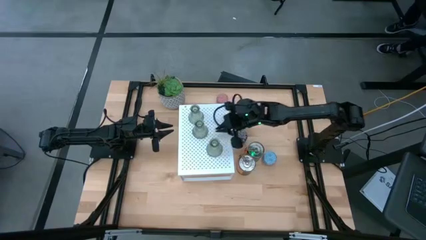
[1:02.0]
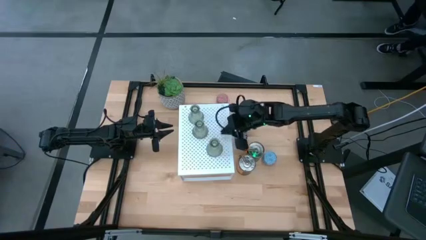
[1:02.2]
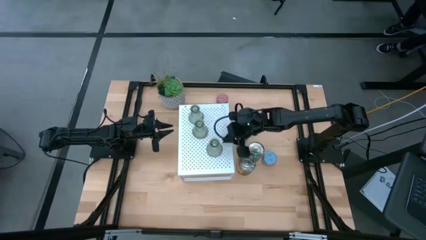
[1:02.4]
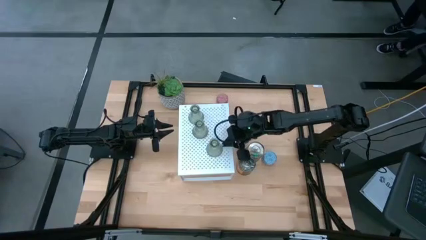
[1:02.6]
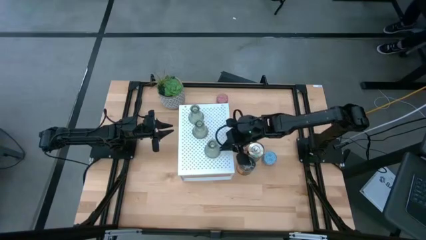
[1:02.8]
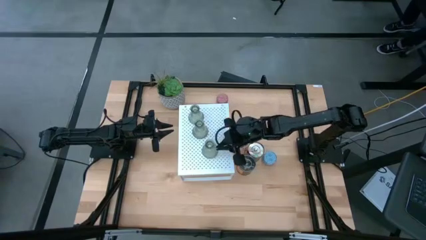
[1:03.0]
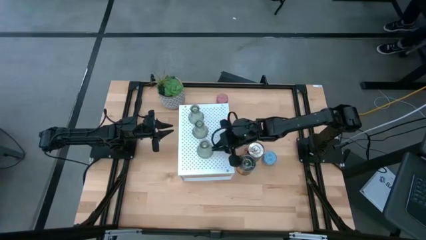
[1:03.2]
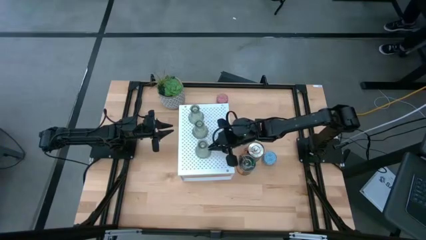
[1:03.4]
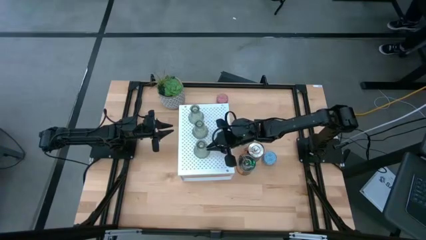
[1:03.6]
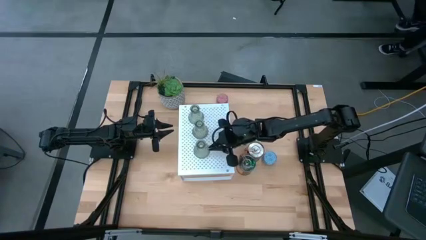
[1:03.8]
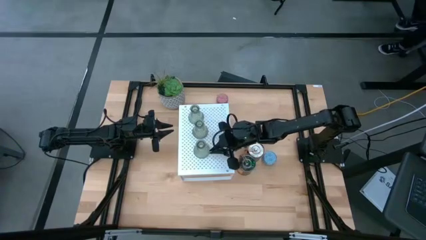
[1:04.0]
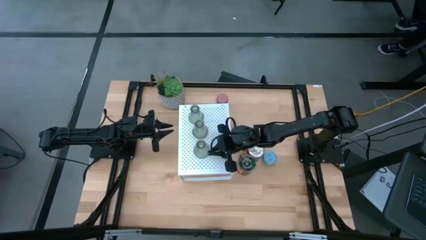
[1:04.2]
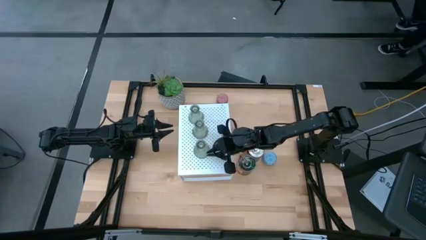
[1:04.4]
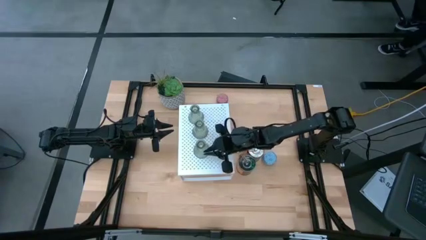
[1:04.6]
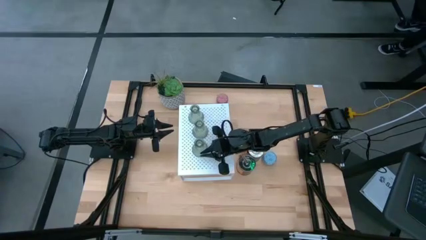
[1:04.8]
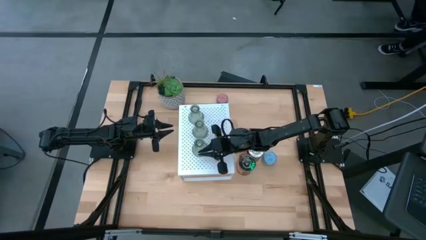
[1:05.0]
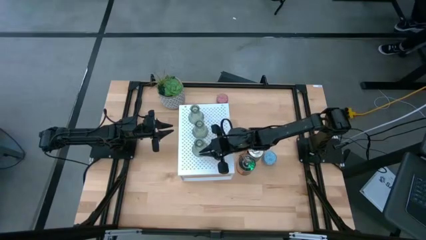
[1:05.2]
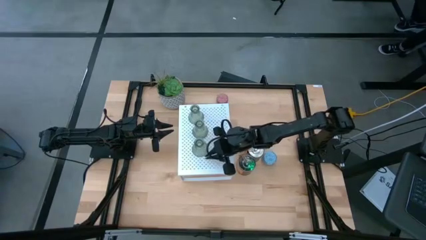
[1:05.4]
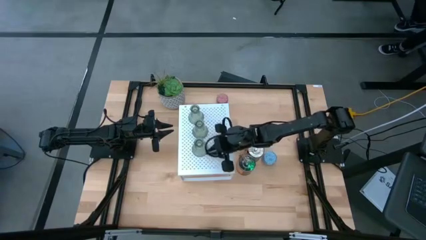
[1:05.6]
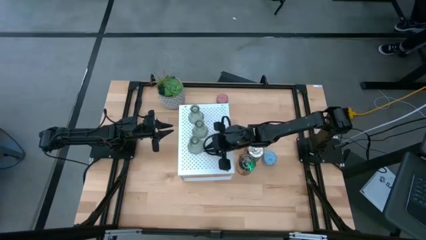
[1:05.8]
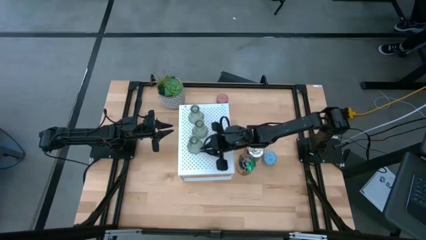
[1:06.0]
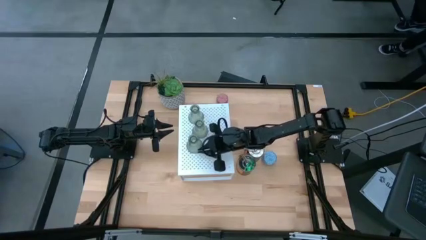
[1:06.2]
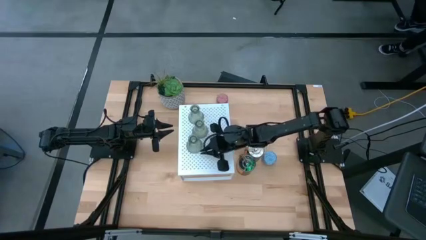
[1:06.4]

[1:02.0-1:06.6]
Task: Pick & Place candle stick holders
Adjust the green glass candle holder on the shelf

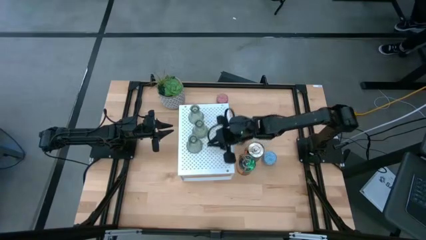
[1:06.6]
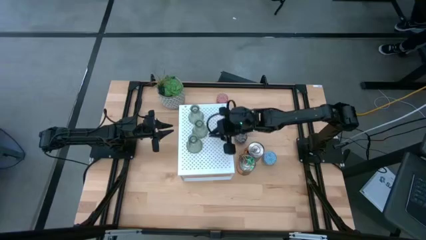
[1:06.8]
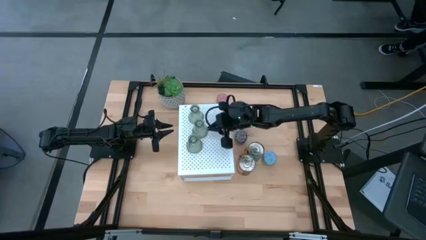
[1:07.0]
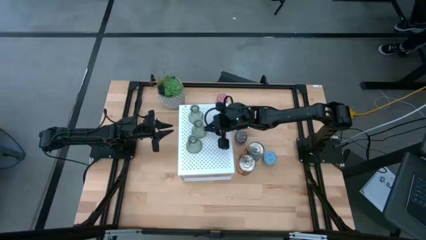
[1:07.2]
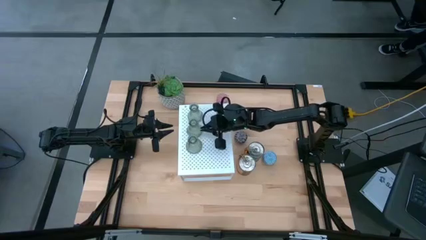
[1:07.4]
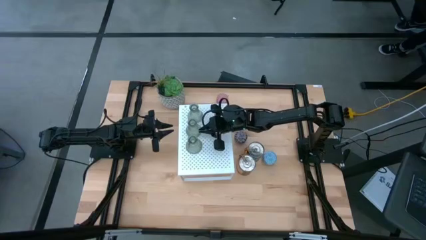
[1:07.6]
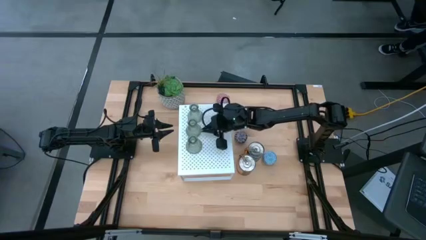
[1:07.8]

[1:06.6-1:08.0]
Adjust the green glass candle holder on the shelf

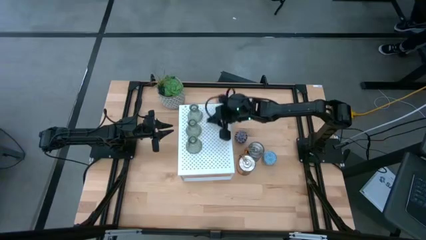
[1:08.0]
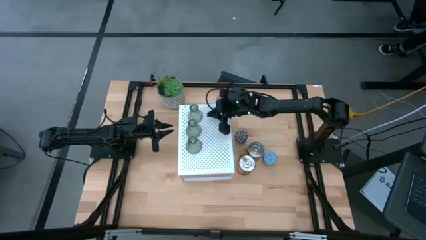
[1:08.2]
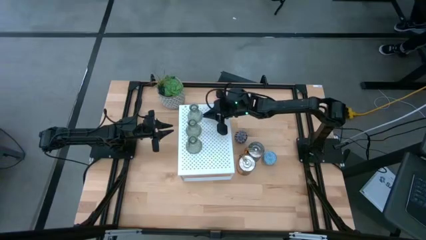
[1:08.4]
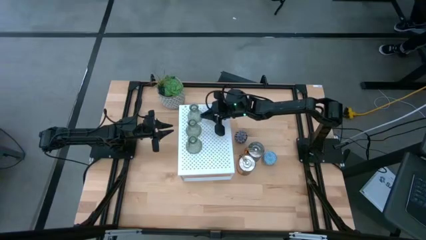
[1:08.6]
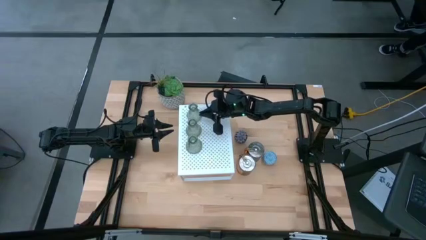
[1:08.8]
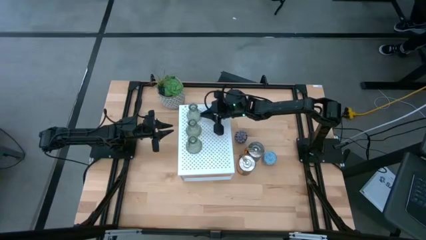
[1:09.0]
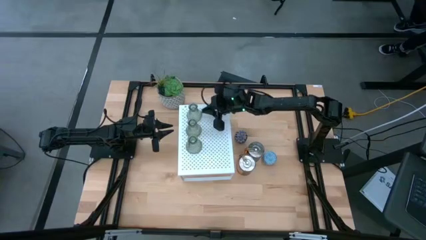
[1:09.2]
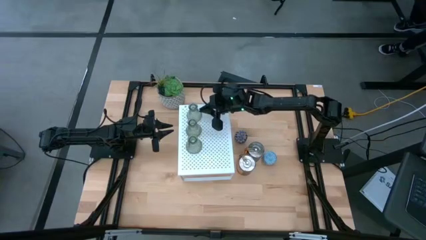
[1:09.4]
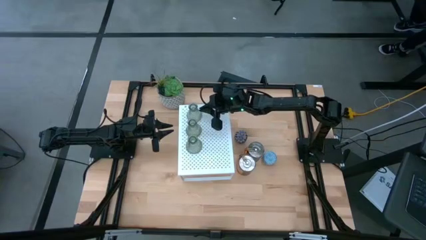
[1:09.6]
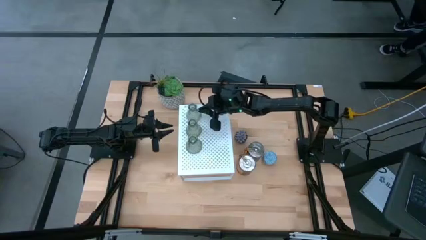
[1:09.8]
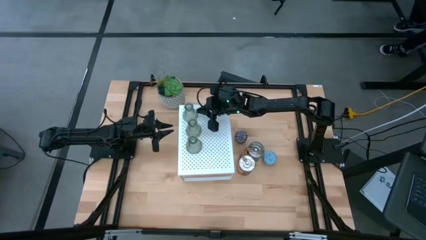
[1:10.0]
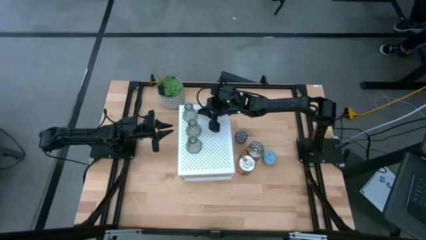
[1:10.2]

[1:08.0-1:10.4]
Adjust the green glass candle holder on the shelf

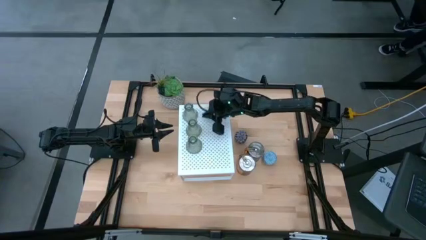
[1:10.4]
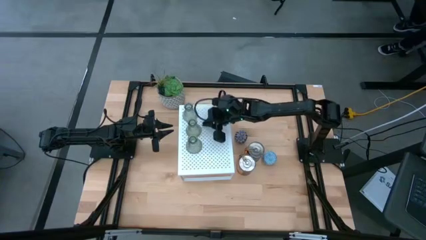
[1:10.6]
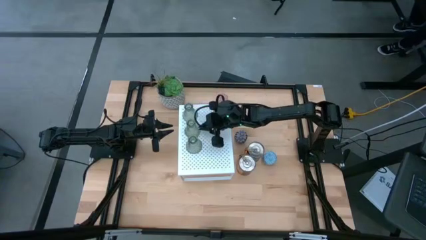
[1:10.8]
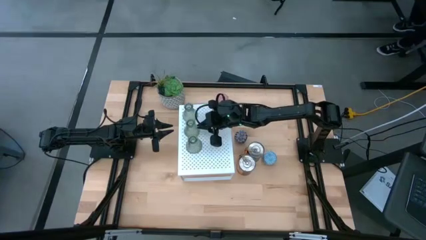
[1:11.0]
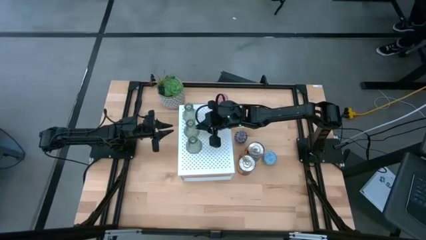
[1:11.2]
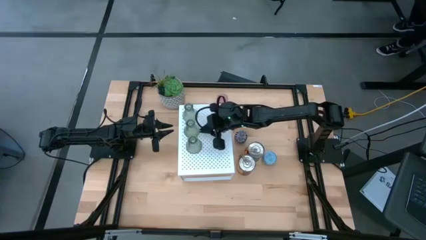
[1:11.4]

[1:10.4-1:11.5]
Adjust the green glass candle holder on the shelf

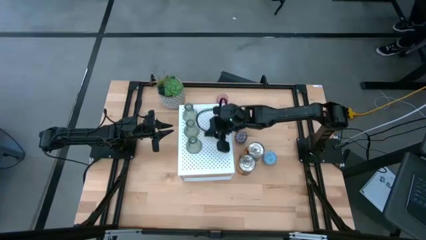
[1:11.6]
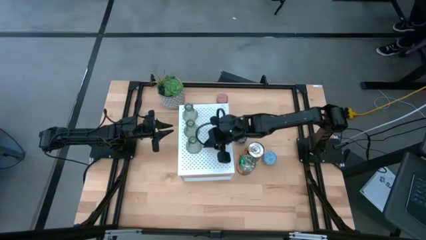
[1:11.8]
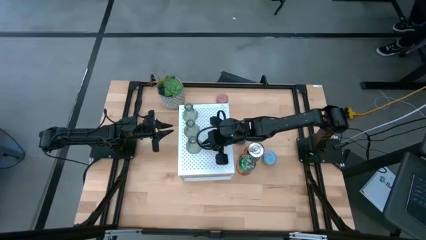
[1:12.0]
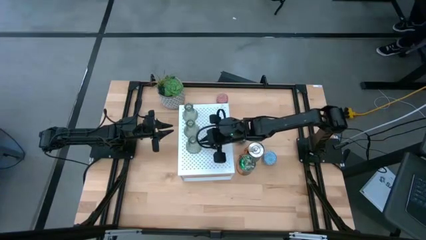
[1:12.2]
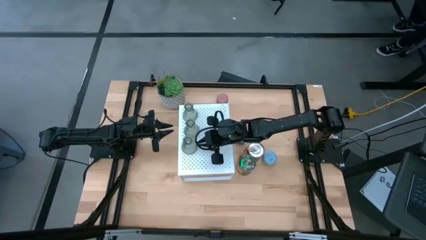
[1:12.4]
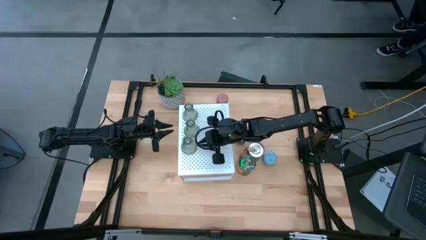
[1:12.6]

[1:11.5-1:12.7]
Adjust the green glass candle holder on the shelf

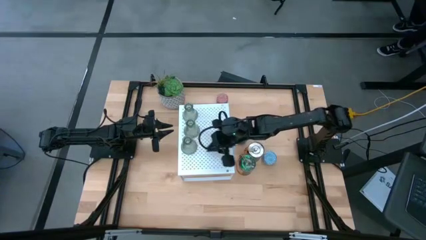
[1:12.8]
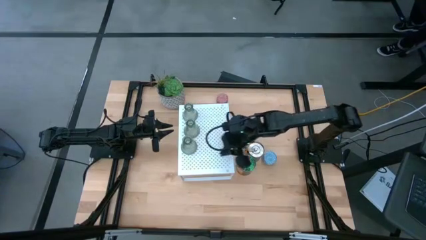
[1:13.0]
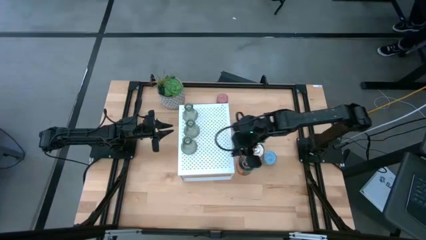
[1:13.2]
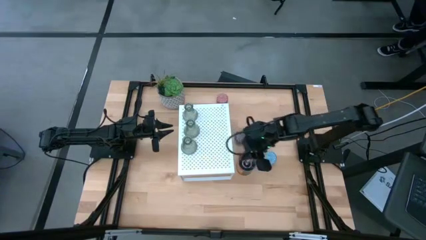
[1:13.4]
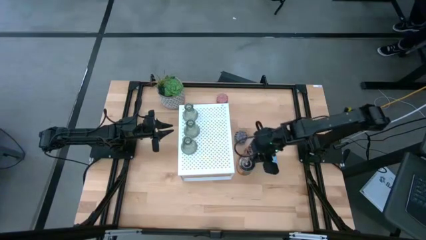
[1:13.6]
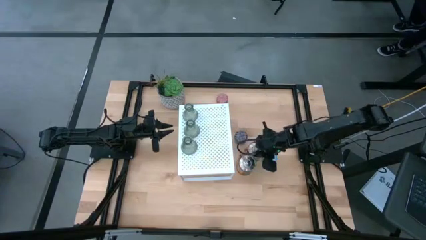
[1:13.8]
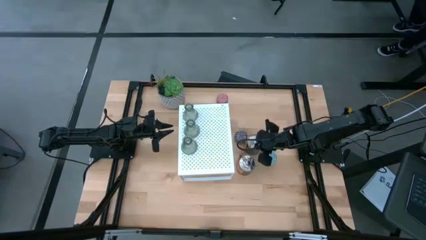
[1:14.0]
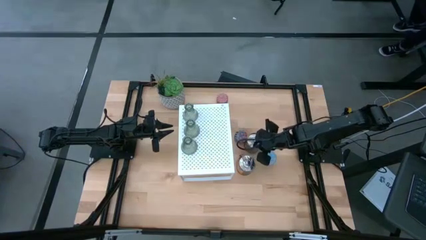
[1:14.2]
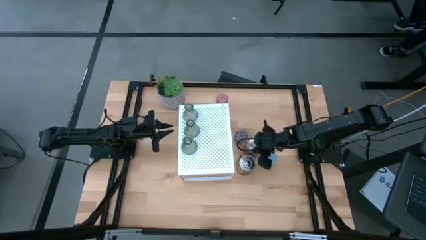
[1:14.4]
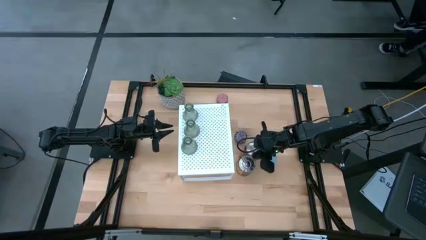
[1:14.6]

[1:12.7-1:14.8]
Put the top orange scented candle on the shelf

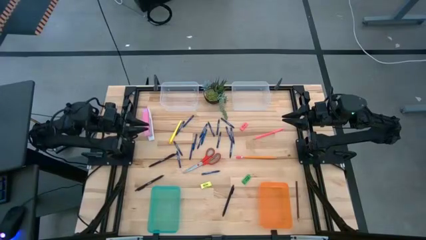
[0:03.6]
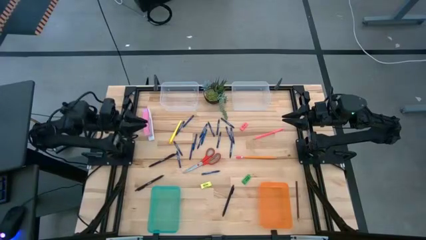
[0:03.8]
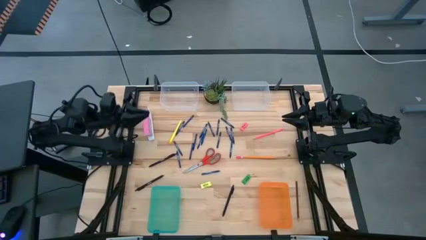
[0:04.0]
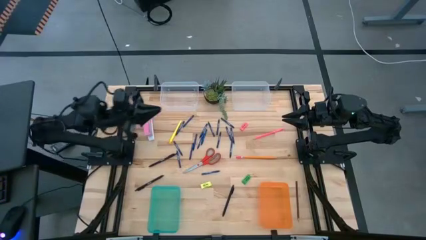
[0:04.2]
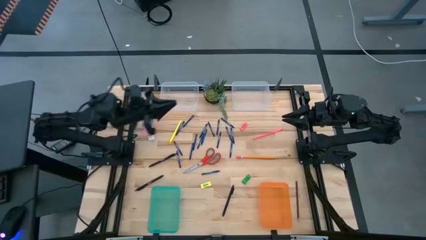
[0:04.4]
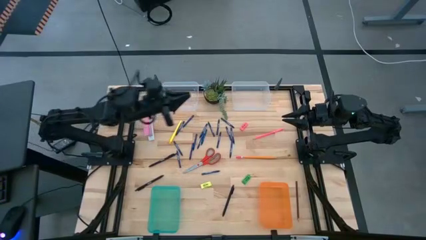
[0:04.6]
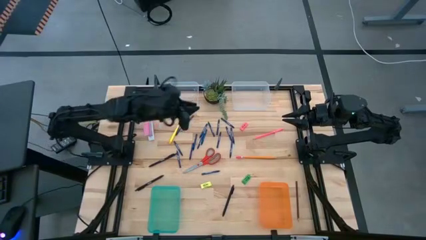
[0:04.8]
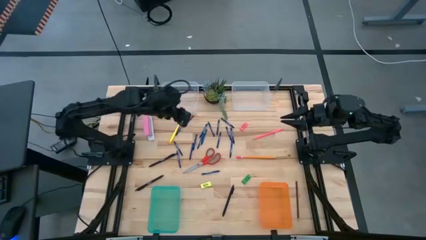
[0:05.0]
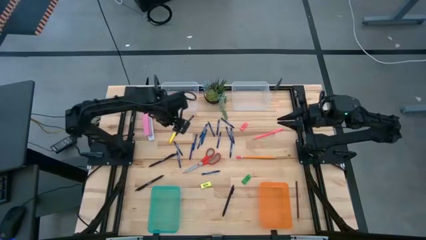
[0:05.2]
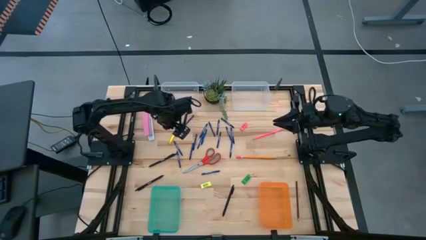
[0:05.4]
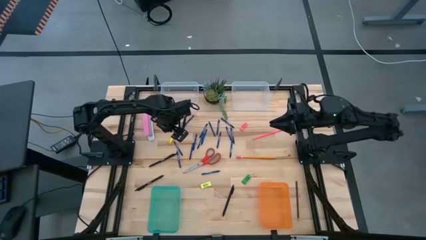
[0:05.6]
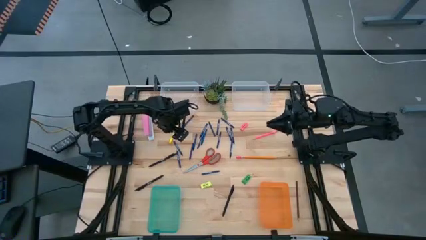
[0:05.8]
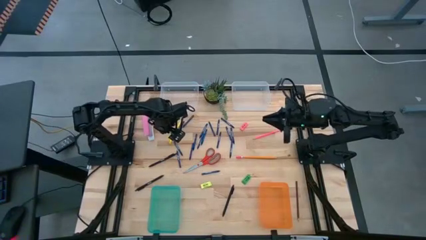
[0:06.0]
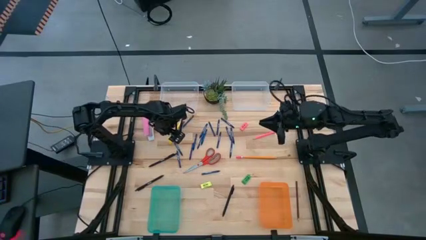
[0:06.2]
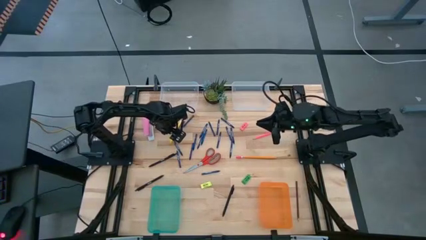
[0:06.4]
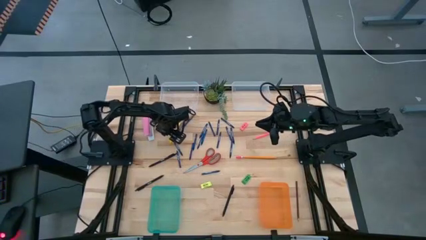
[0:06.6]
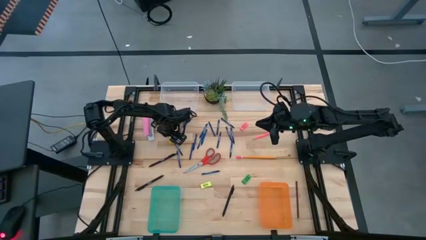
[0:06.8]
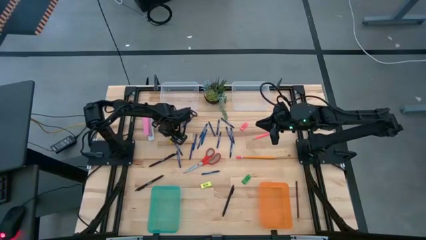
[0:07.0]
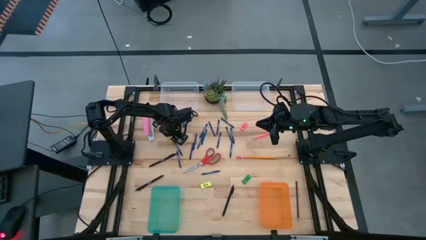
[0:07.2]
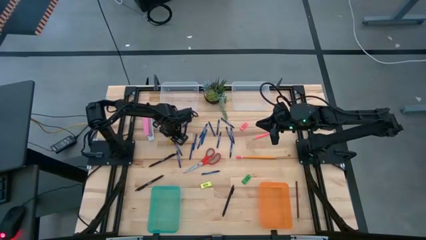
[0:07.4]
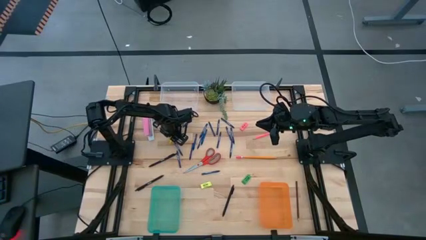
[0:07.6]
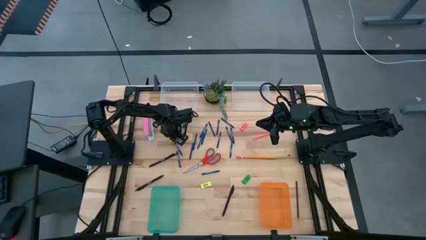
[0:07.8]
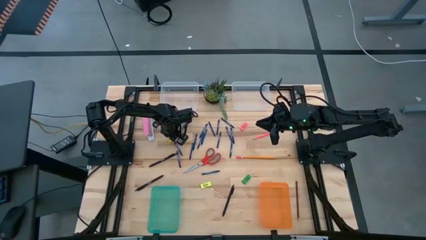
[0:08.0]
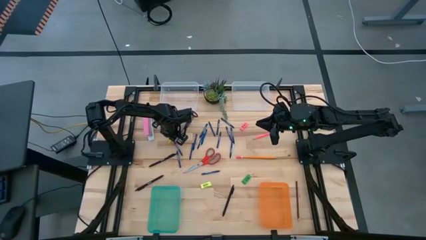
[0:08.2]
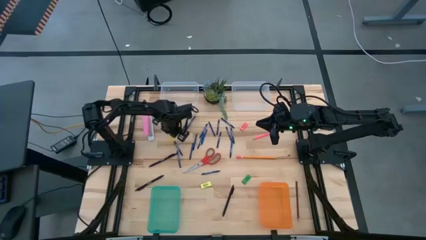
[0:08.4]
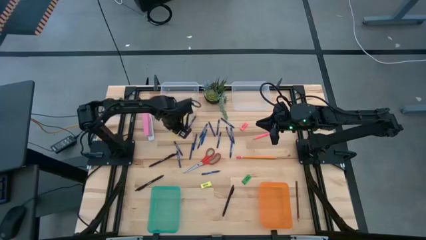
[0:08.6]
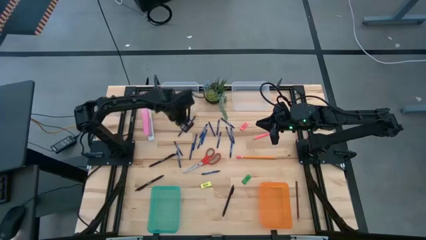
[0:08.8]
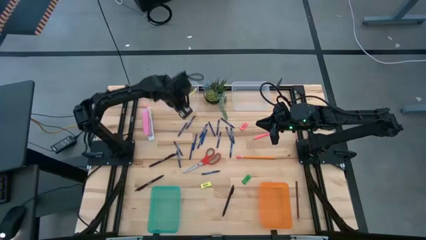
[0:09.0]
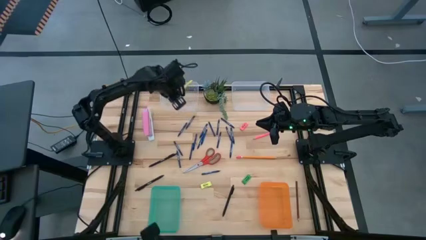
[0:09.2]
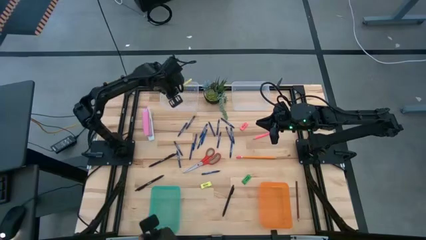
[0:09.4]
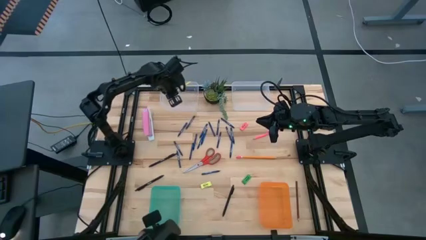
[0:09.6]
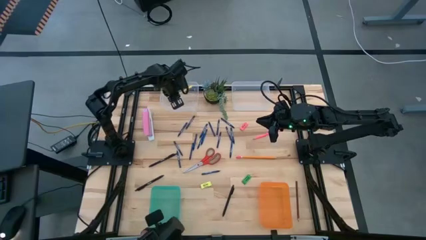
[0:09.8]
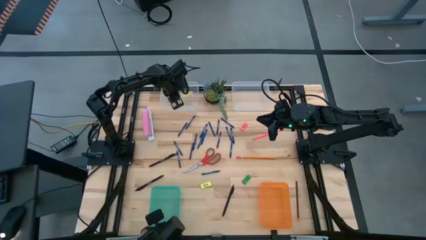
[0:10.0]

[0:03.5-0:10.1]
Task: Sort crayons/erasers/pens/pencils in bins
Put the yellow pen into the left transparent bin
